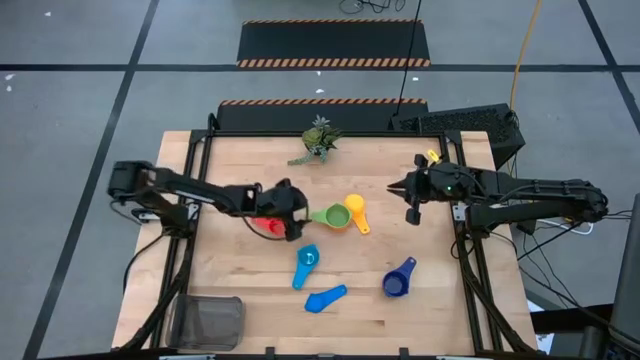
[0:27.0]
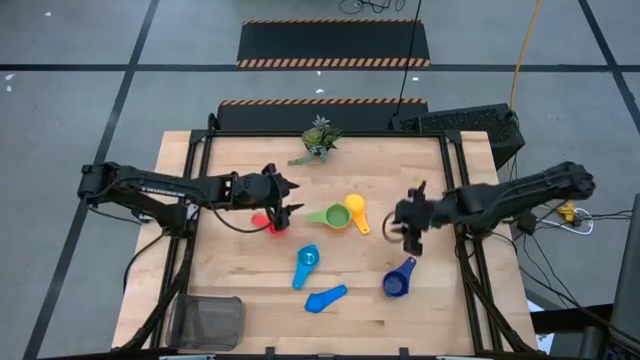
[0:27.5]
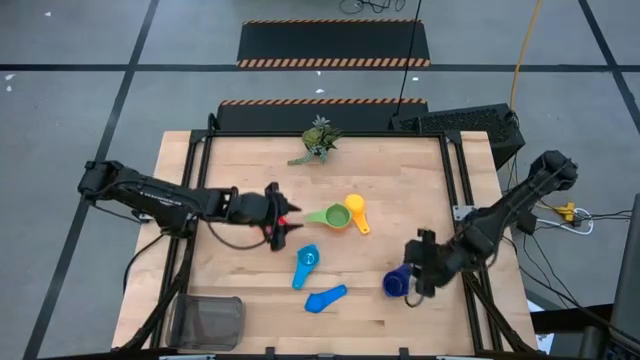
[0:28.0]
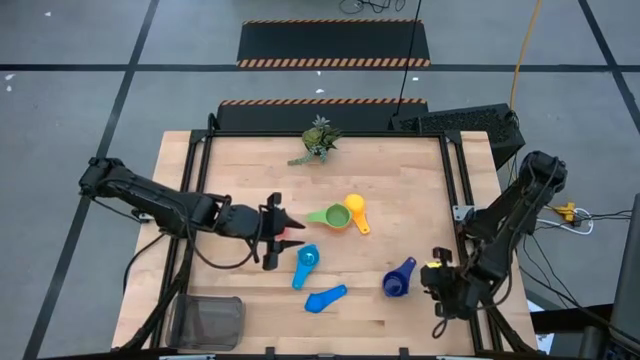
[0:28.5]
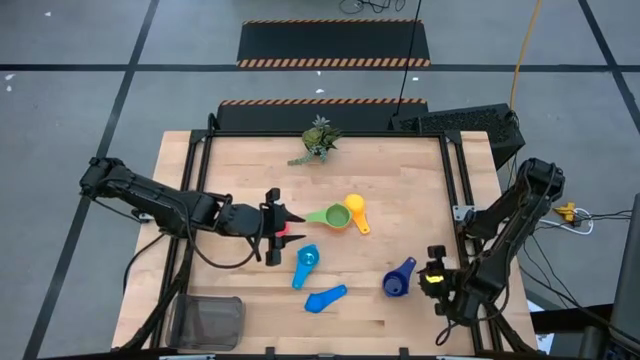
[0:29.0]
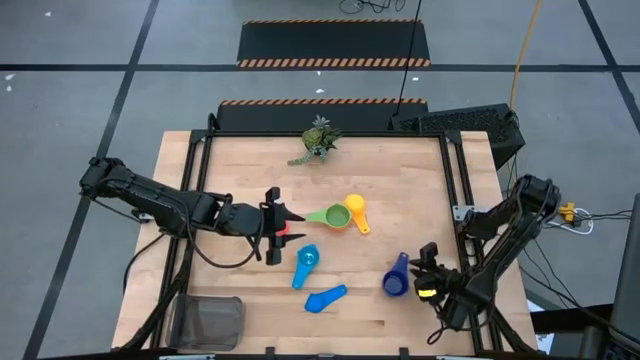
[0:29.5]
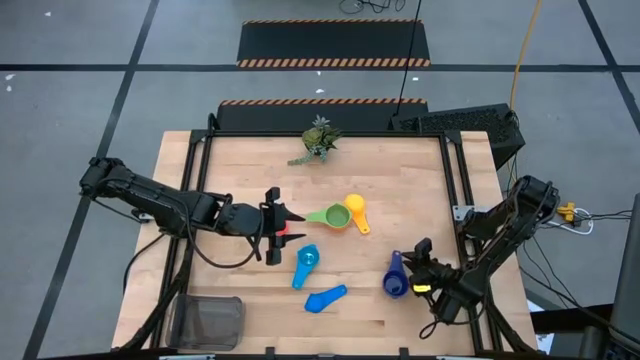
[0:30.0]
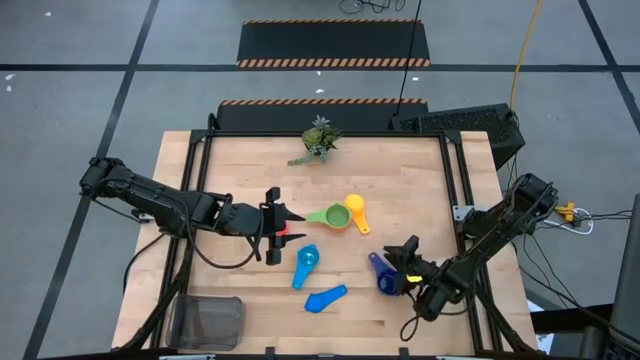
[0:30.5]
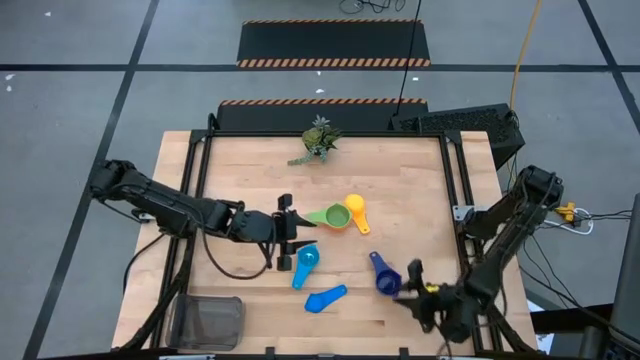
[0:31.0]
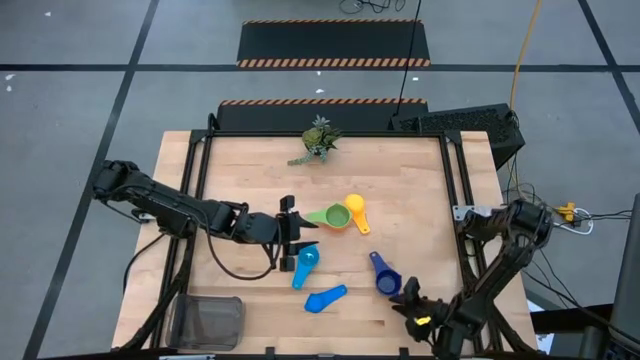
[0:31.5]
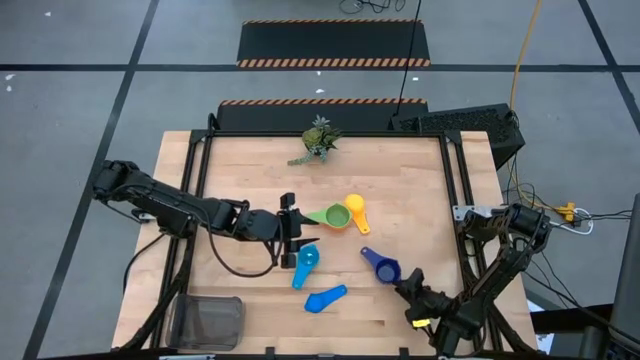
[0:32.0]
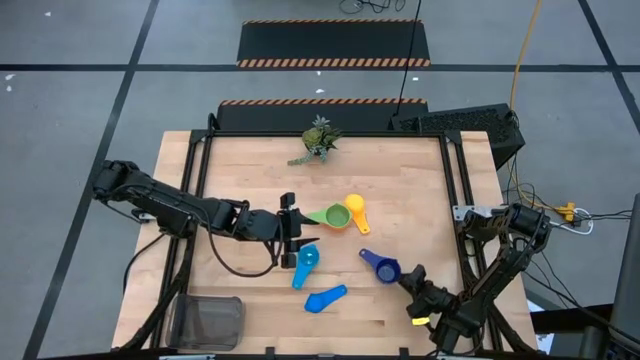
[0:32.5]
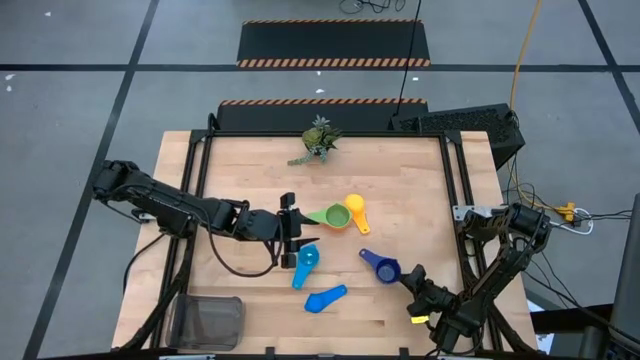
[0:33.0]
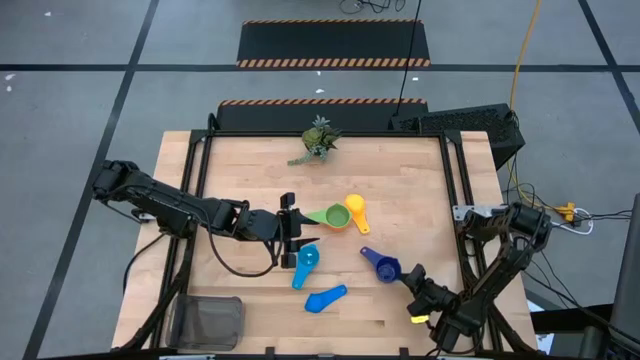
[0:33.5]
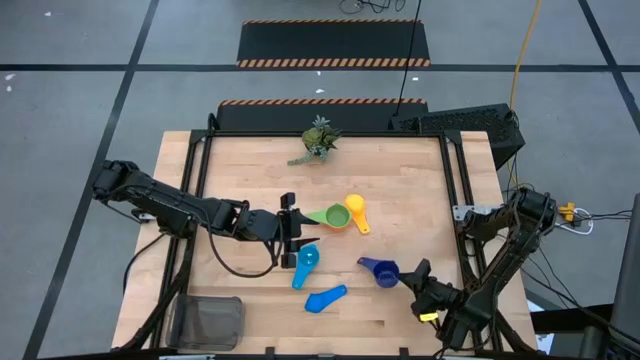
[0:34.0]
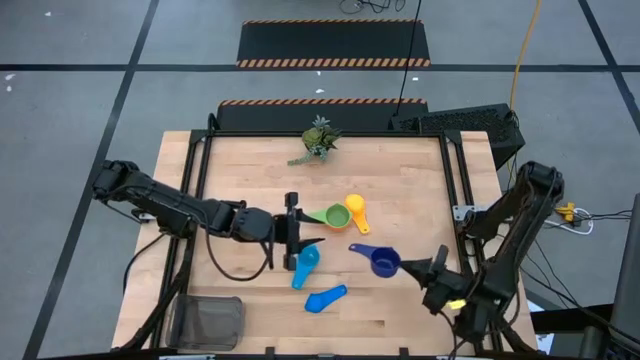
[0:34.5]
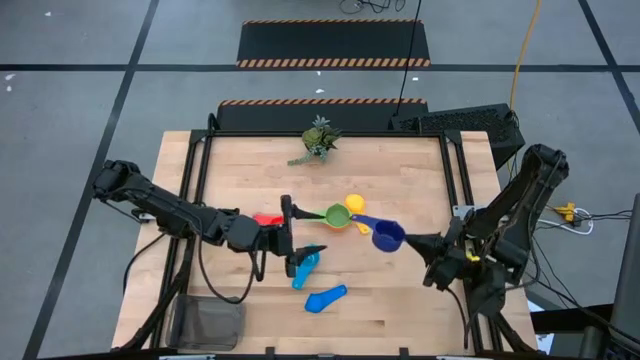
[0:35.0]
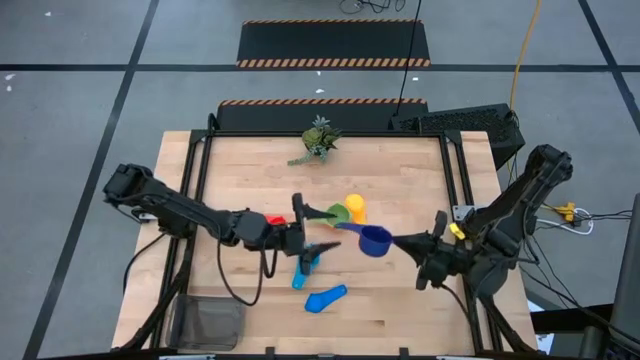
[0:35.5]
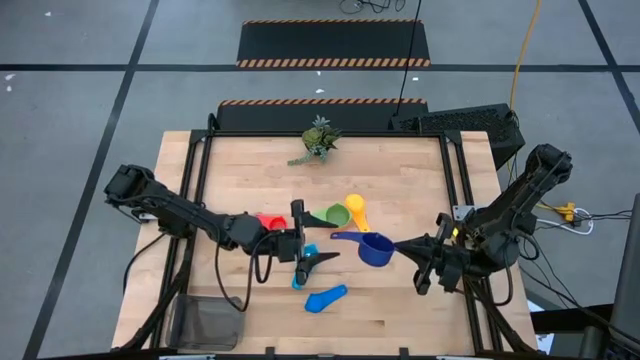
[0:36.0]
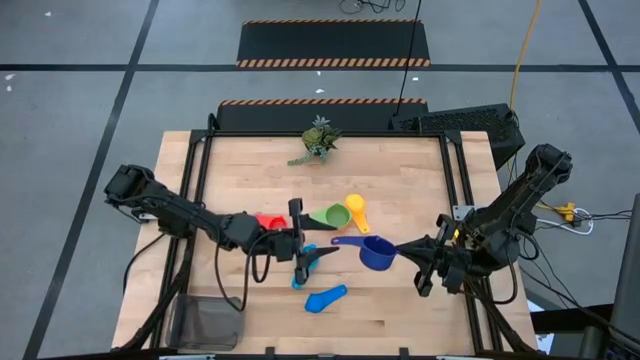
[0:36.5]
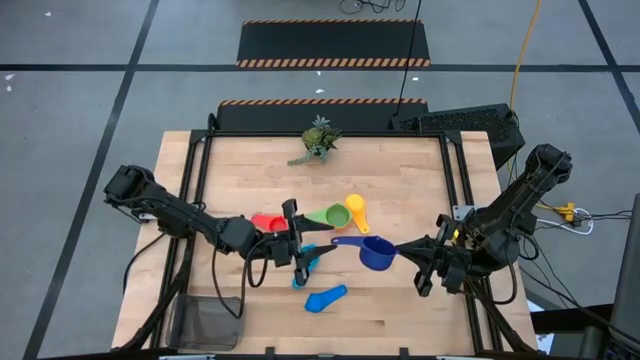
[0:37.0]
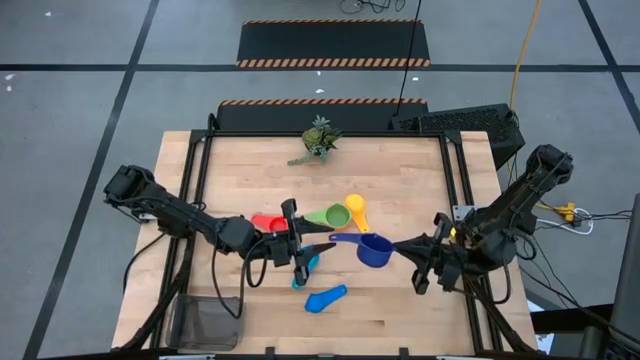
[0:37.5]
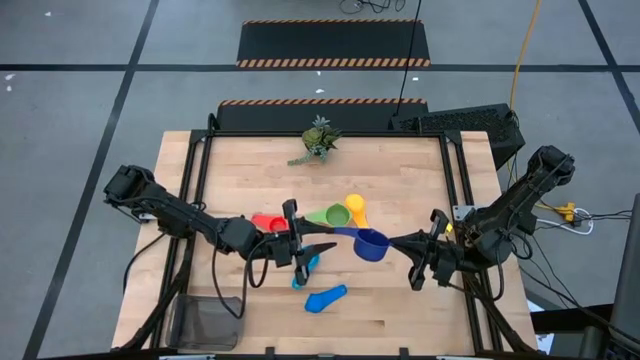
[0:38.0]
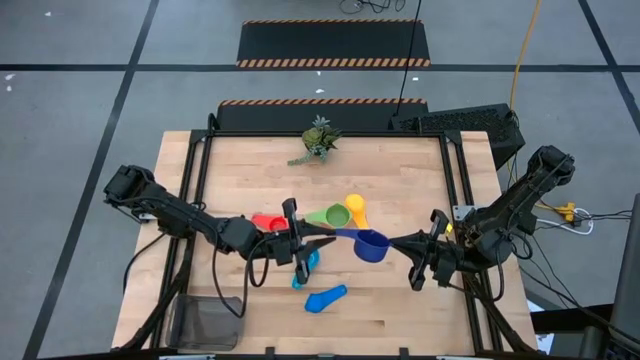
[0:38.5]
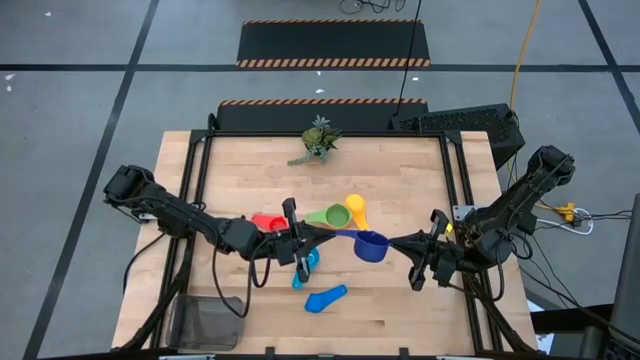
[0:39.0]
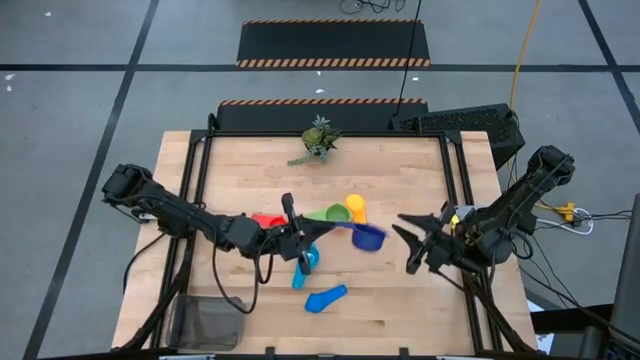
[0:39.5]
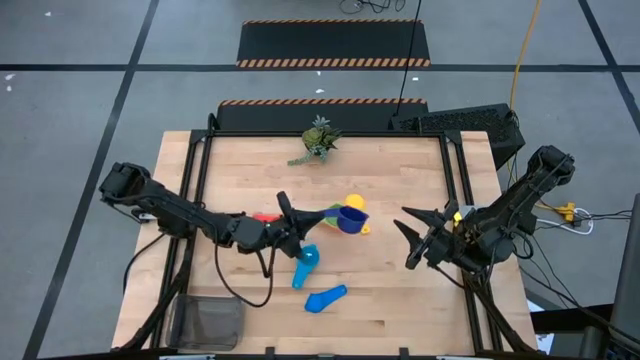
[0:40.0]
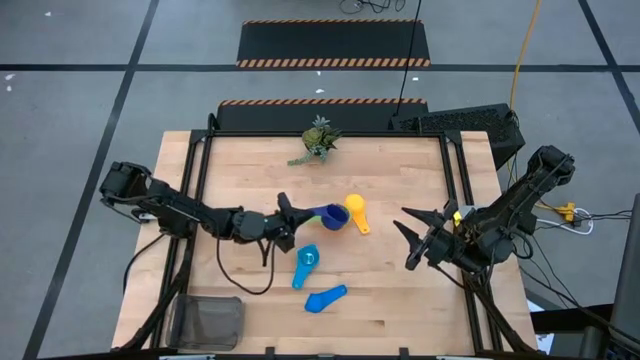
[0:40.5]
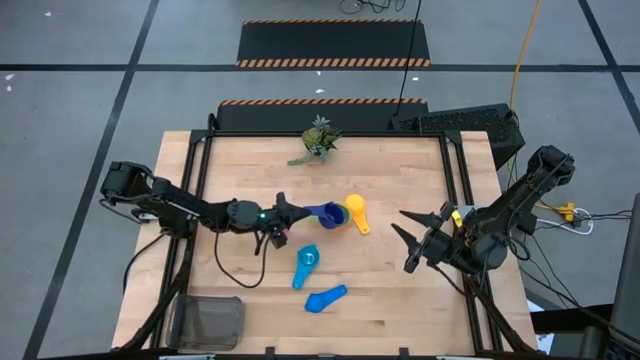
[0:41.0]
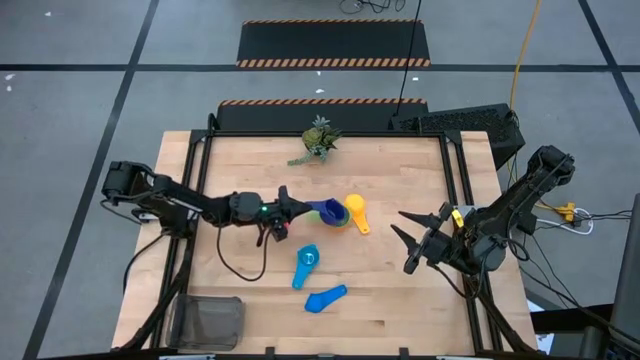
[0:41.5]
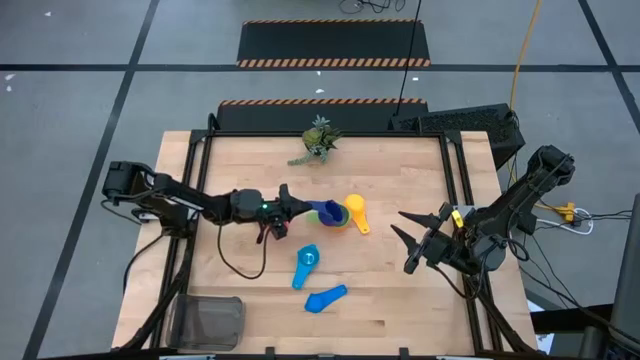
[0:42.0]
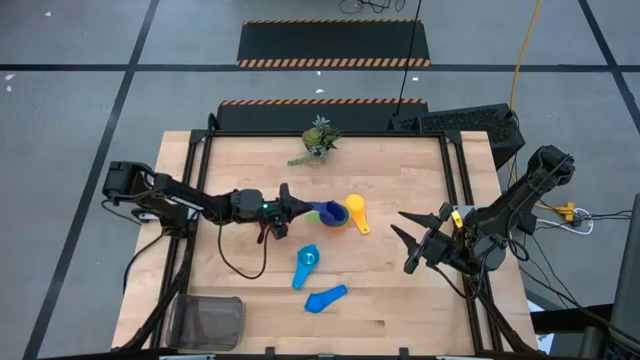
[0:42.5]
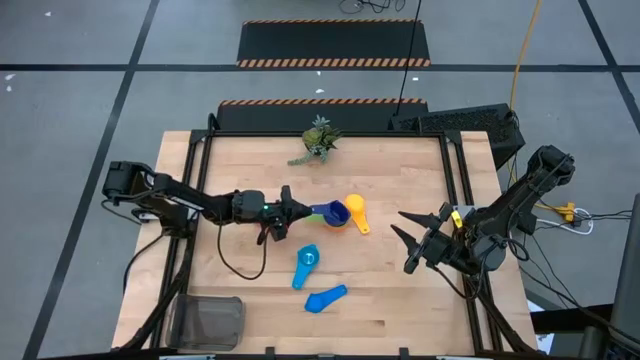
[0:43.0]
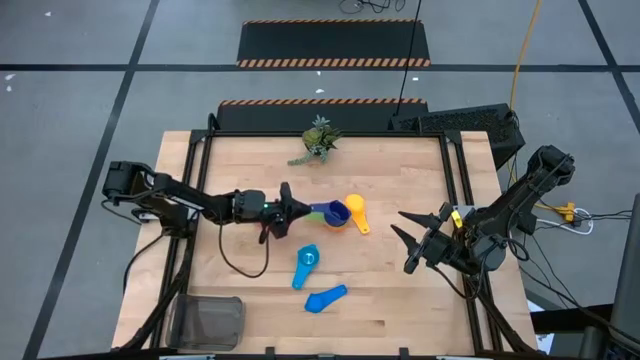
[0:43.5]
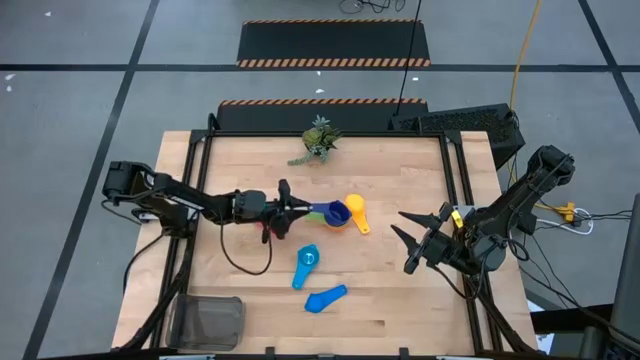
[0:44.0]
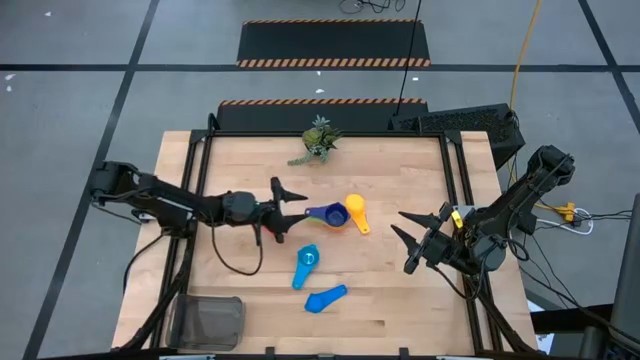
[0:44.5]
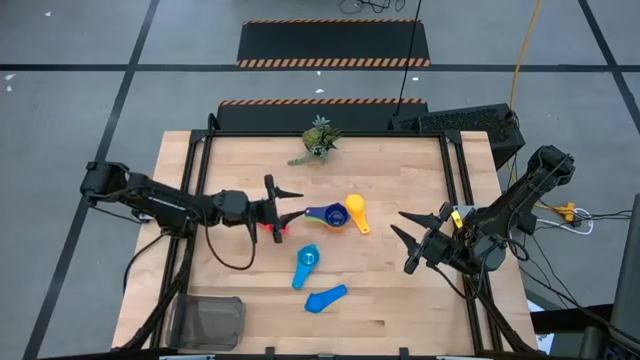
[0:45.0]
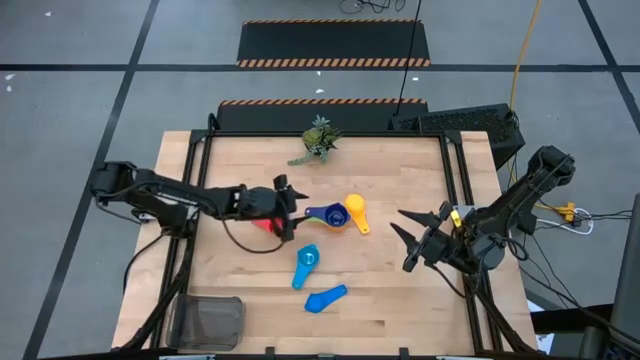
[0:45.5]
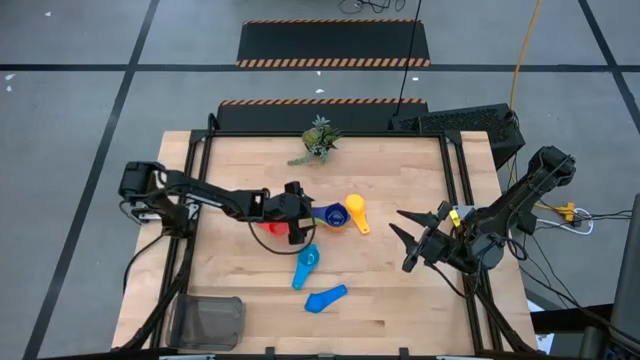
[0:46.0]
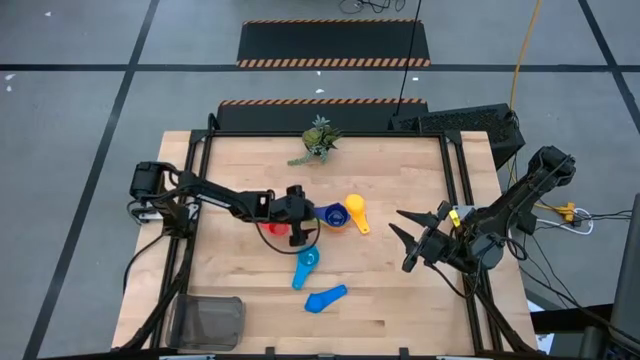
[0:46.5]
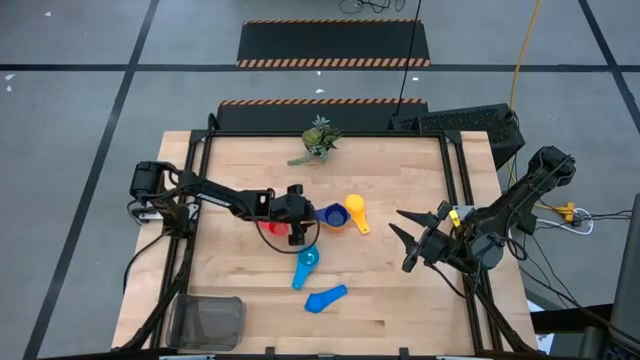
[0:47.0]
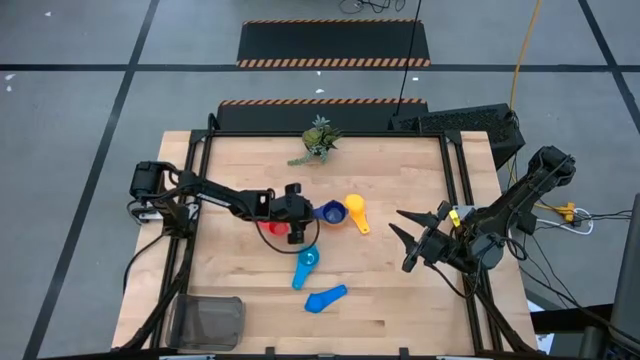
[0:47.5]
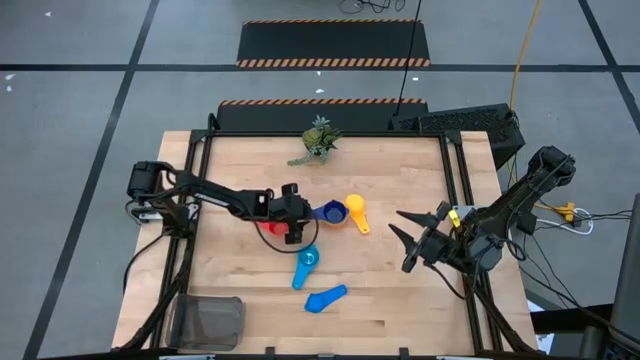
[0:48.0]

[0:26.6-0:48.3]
Task: Nest measuring cups in basket
Stack the dark blue measuring cup on top of the green measuring cup
